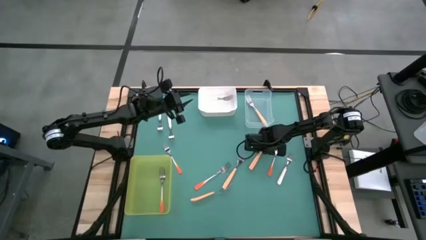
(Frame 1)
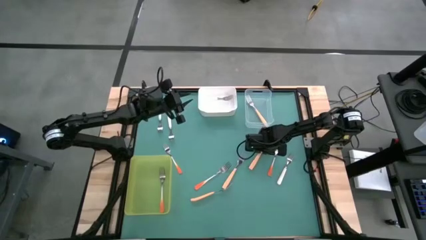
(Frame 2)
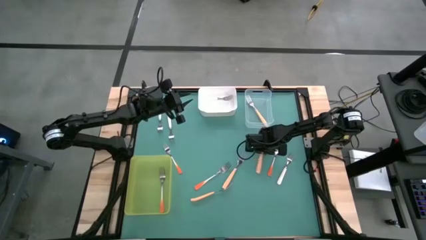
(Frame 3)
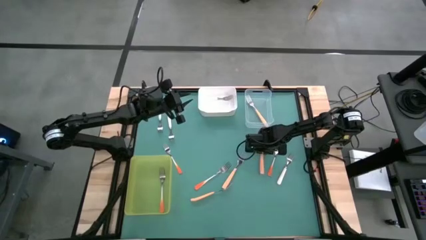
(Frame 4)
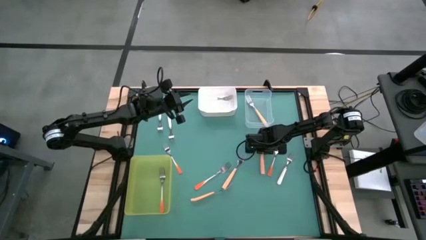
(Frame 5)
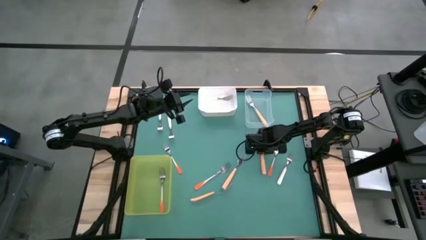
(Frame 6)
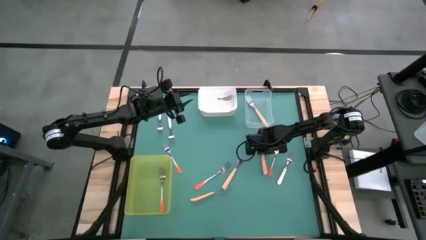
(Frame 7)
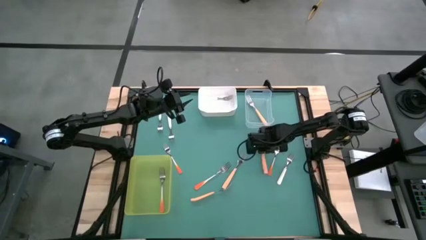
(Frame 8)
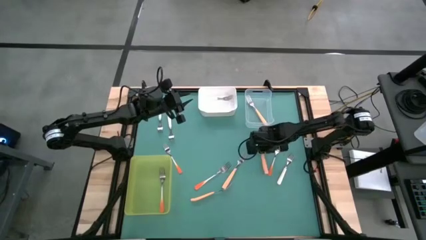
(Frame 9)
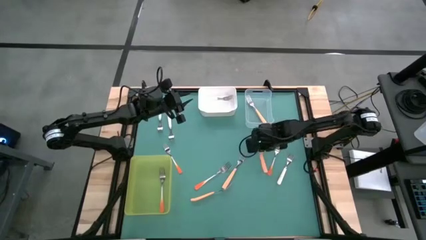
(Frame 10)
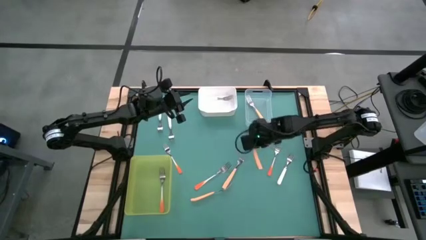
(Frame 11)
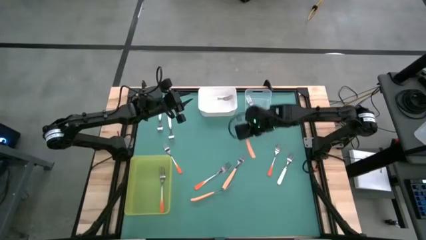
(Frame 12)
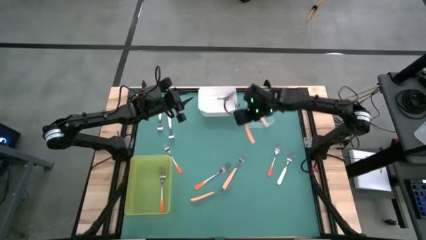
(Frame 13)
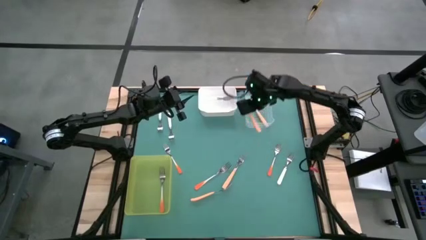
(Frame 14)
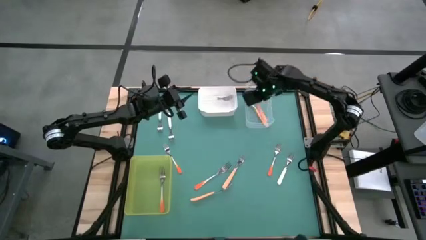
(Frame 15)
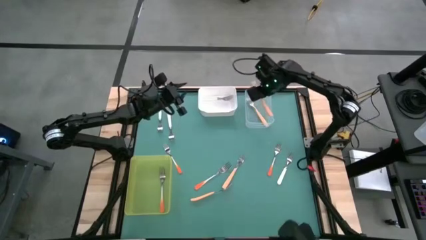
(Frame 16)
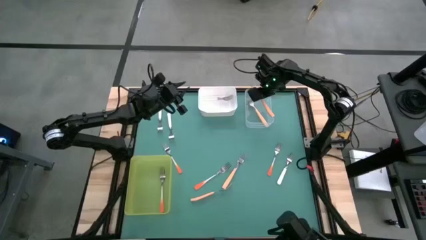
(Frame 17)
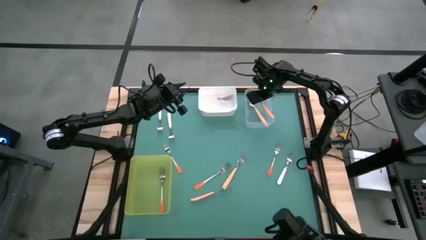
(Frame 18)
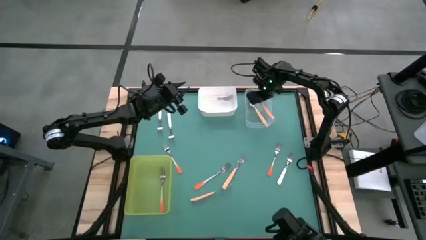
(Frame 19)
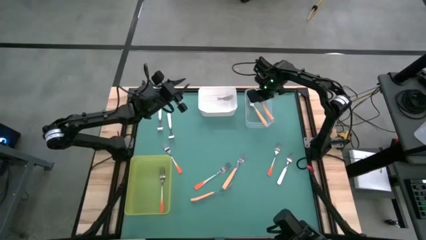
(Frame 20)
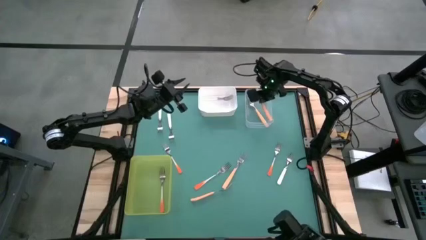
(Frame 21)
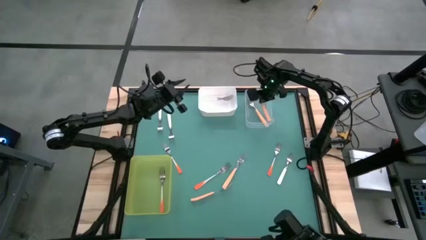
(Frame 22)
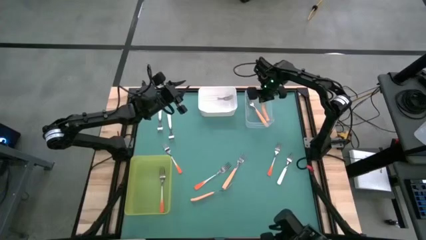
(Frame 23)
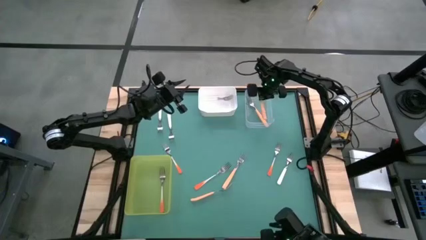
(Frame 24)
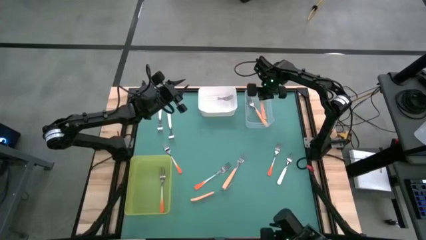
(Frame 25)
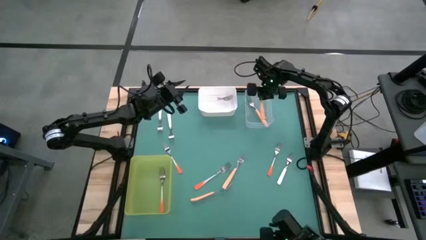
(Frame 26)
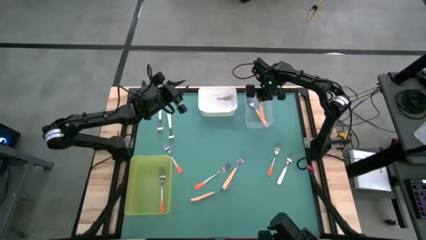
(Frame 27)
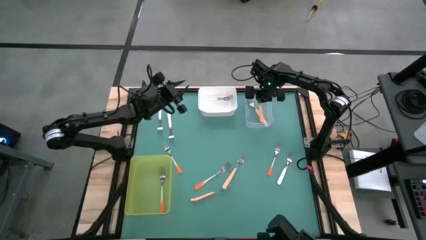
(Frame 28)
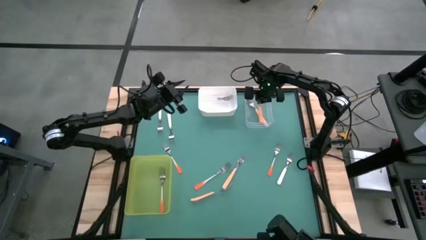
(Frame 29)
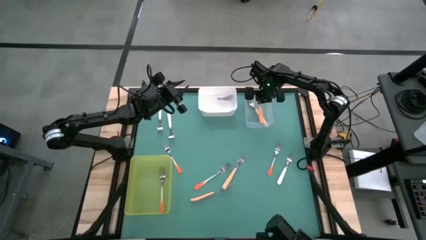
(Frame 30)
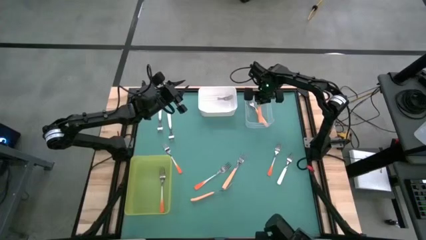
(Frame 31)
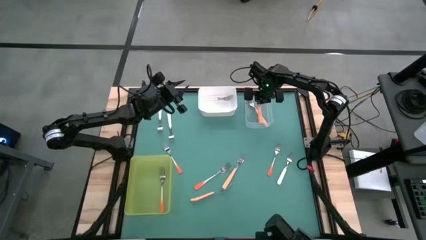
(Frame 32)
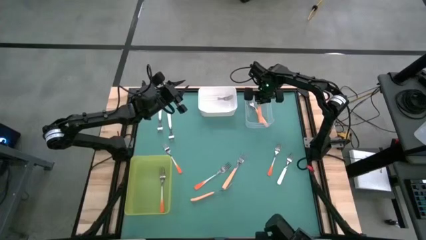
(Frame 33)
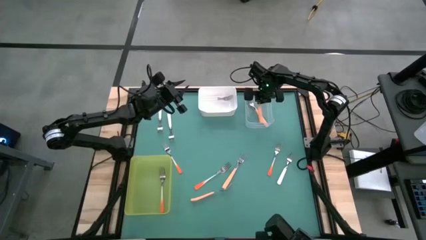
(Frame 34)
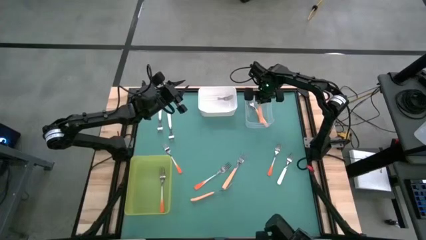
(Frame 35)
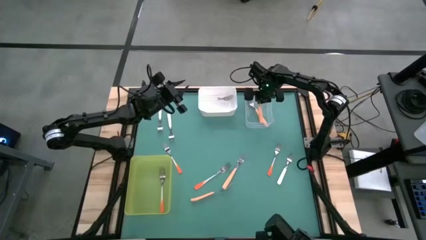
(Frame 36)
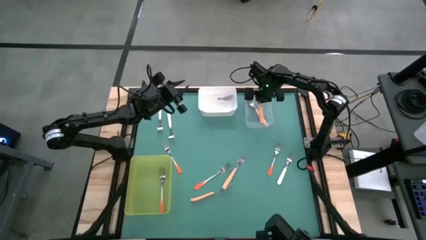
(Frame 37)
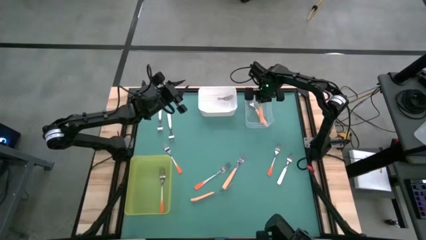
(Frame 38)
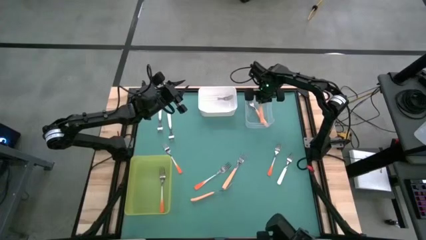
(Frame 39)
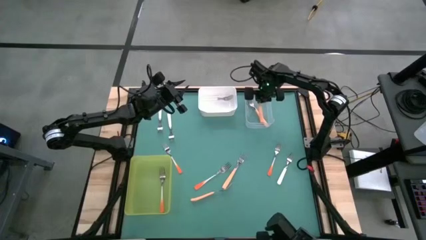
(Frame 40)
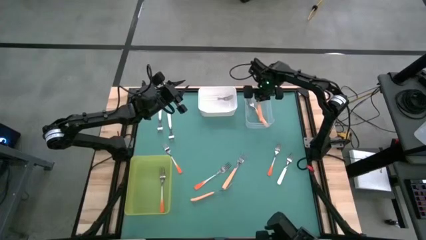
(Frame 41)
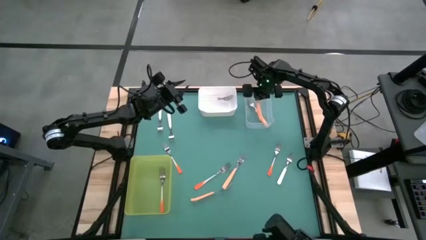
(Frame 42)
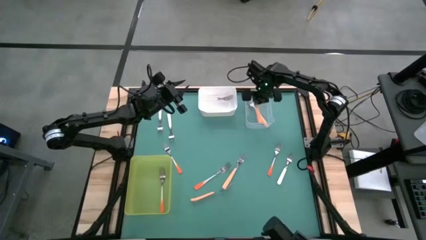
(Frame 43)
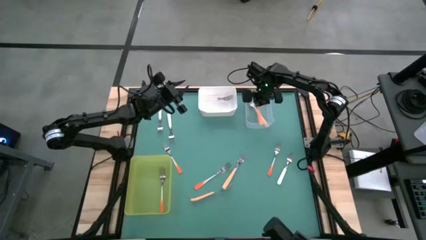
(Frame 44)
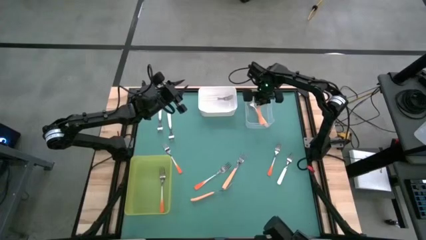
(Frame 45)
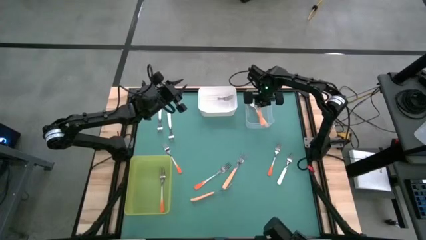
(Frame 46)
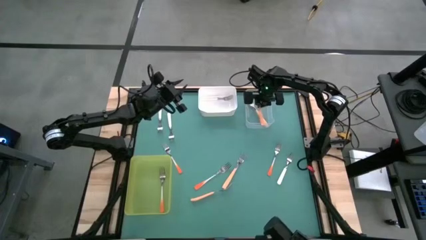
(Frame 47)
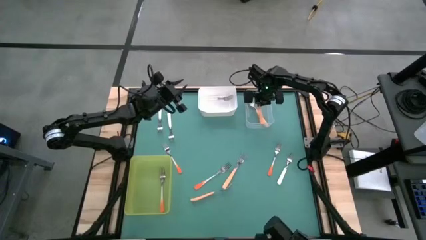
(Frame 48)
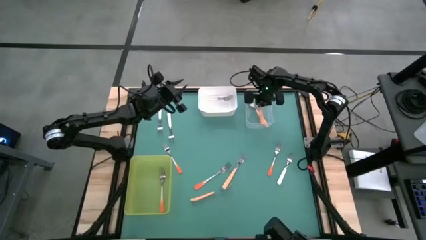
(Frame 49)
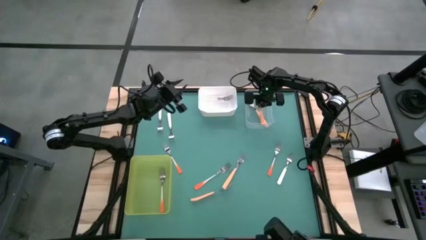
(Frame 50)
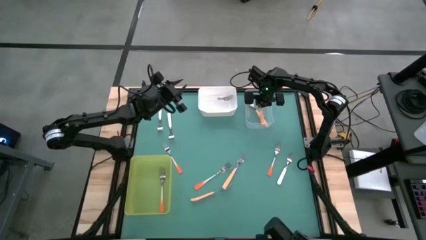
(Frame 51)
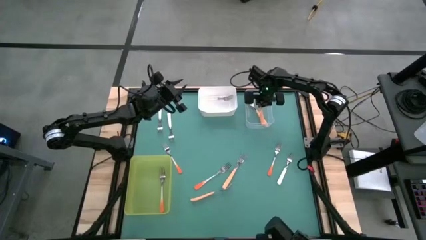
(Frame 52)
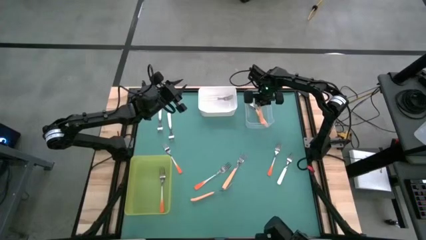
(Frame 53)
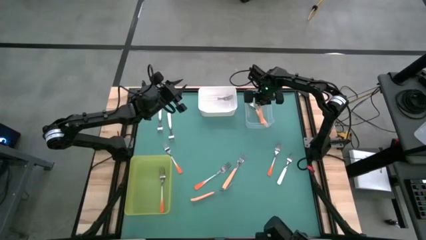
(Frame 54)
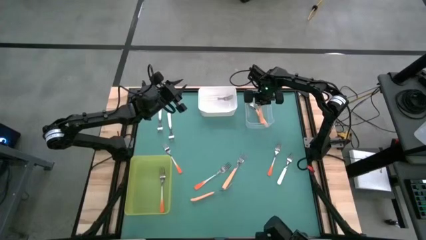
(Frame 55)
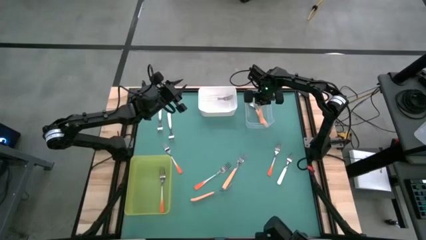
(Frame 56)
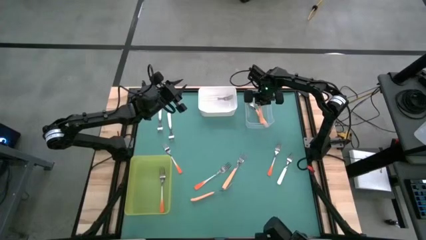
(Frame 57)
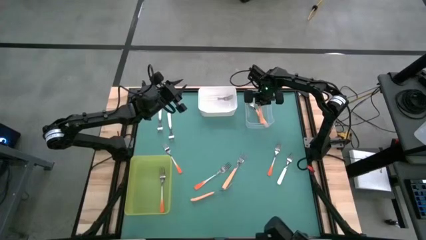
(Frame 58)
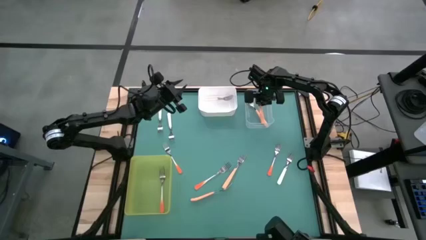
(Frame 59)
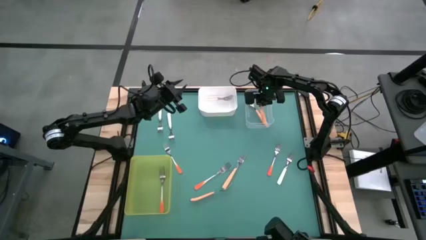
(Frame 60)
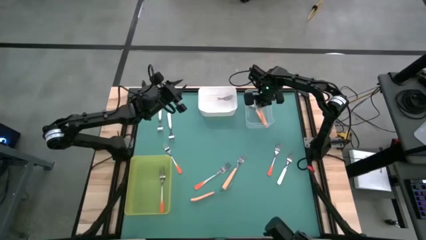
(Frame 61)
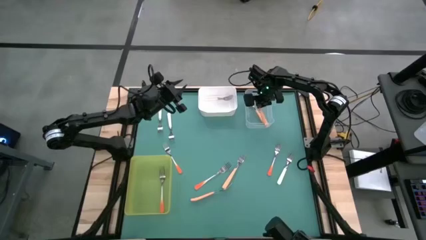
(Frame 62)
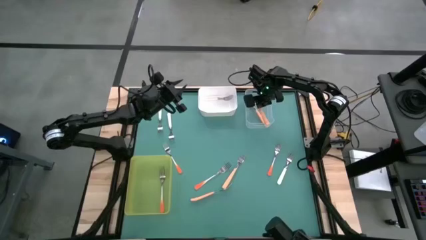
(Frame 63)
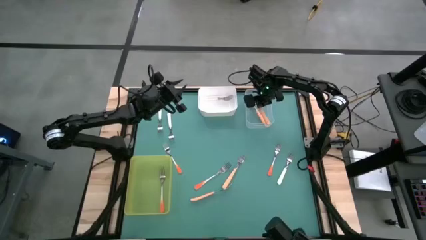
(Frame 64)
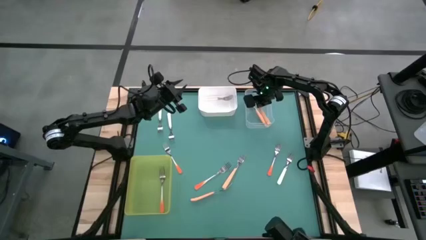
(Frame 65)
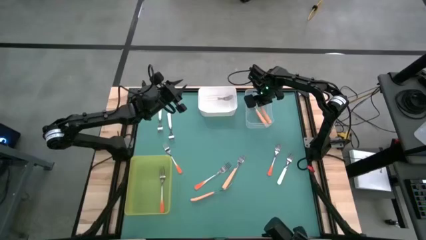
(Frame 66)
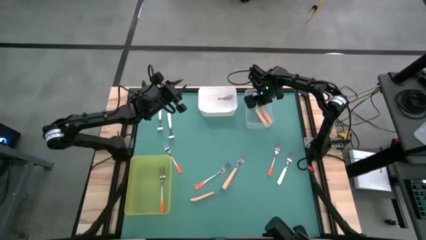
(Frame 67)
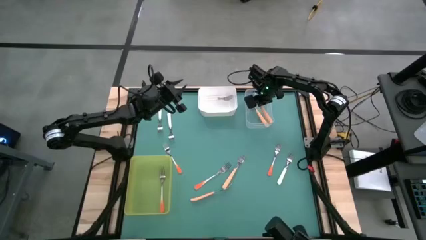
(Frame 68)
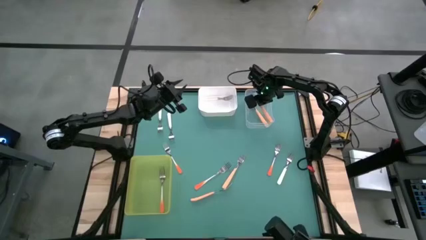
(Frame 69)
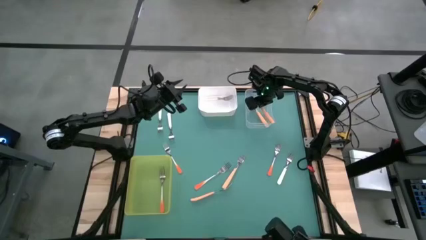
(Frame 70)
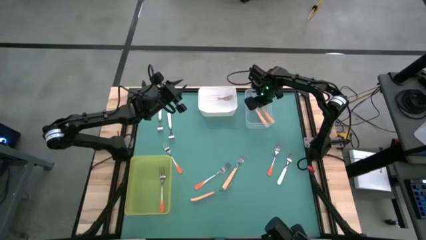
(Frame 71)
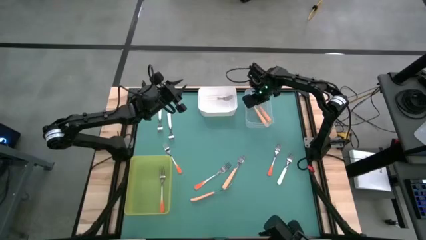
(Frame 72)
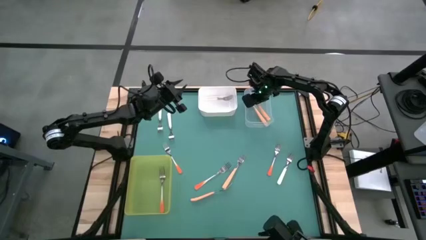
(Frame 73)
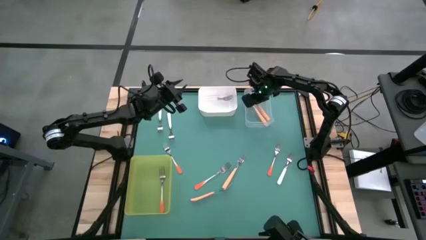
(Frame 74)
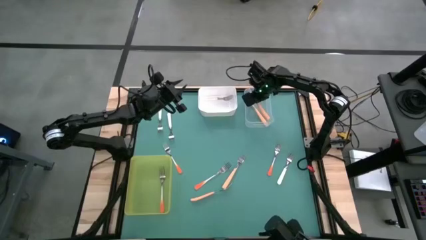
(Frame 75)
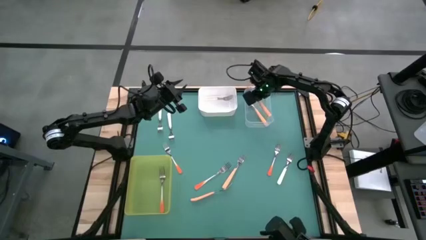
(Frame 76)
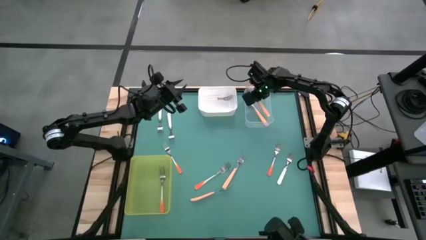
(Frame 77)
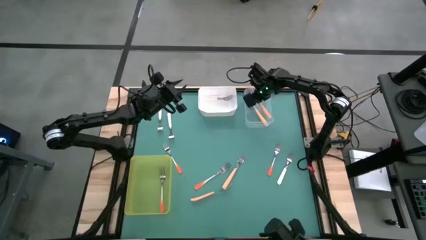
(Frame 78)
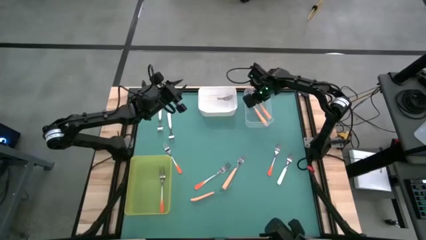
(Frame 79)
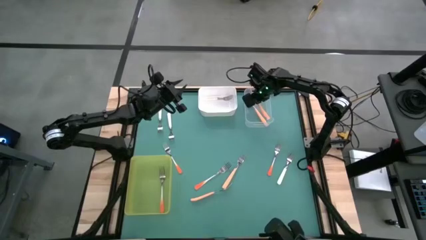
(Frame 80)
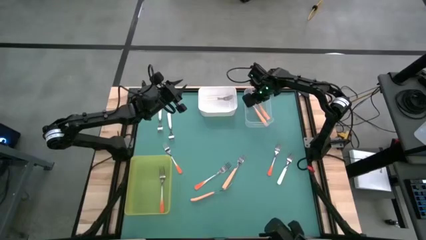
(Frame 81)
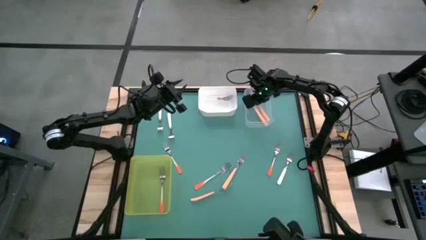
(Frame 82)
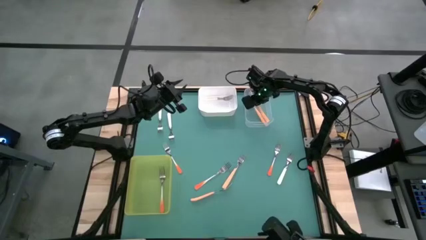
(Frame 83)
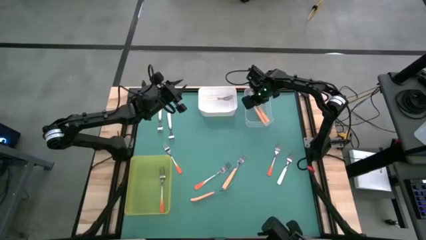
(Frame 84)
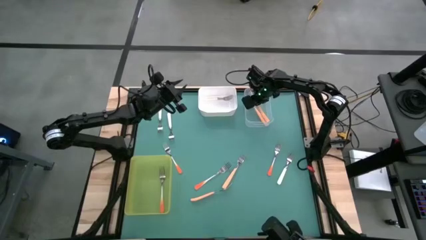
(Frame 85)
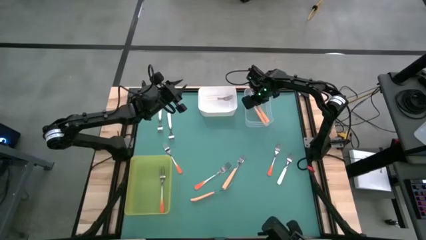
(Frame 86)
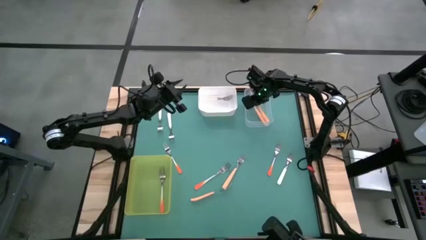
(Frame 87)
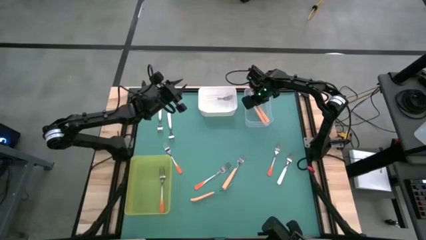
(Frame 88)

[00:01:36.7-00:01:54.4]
Task: Sort silverware by color (type)
Put the light orange fork into the transparent bin
